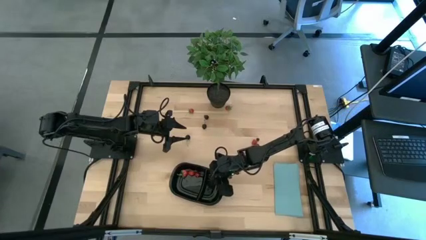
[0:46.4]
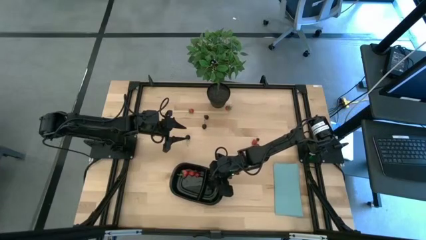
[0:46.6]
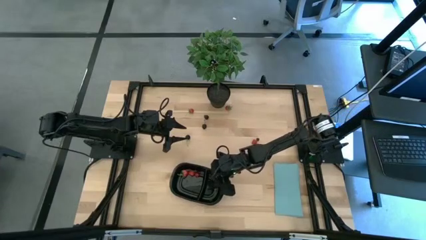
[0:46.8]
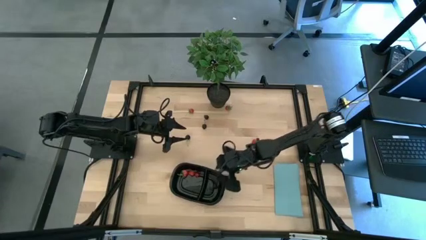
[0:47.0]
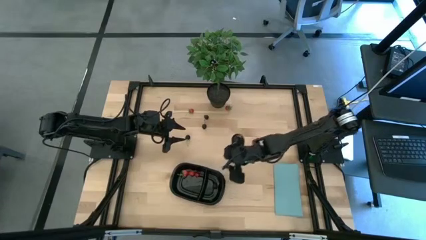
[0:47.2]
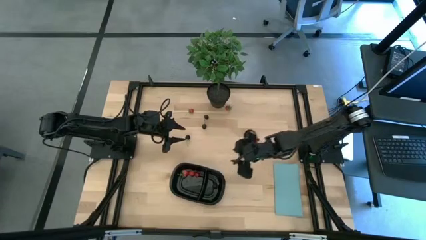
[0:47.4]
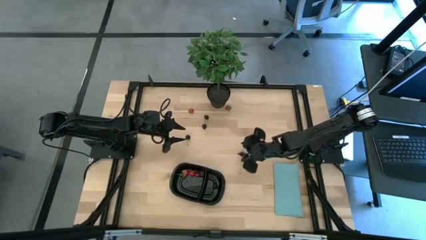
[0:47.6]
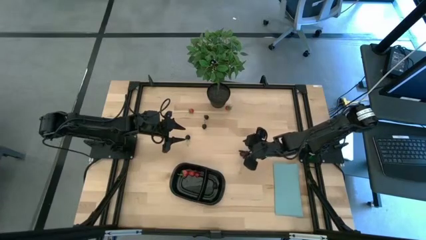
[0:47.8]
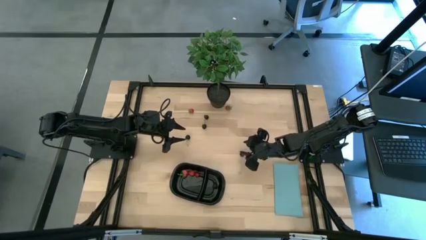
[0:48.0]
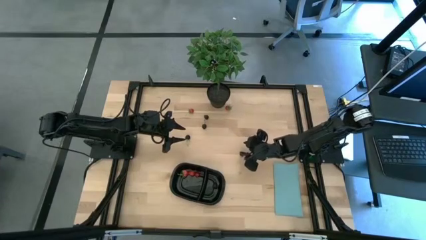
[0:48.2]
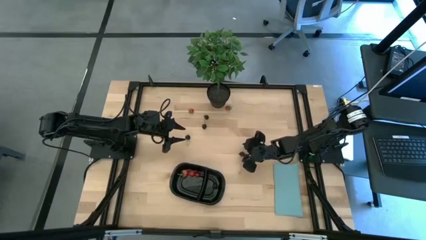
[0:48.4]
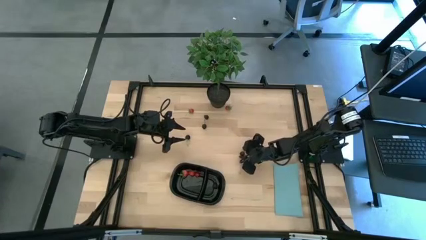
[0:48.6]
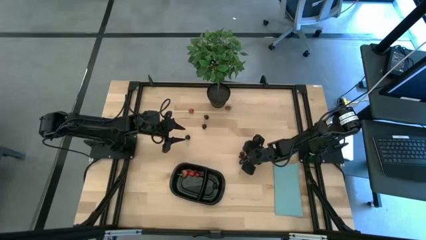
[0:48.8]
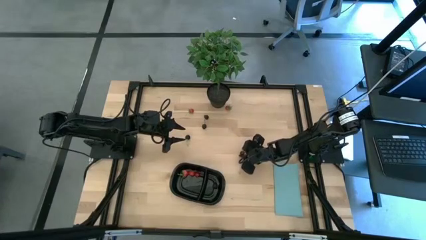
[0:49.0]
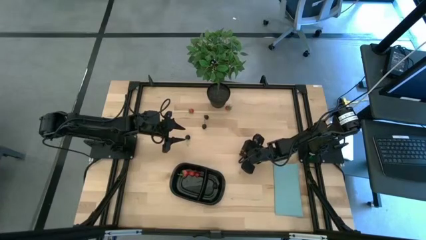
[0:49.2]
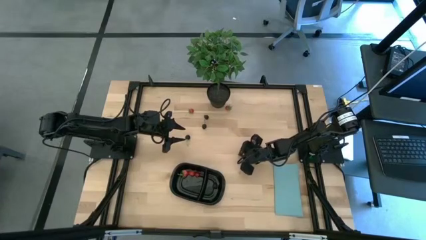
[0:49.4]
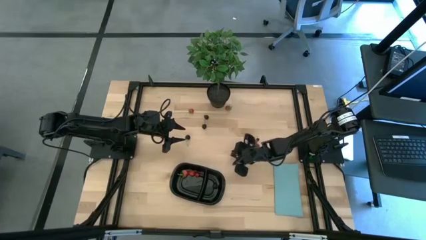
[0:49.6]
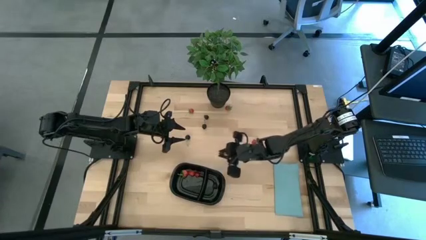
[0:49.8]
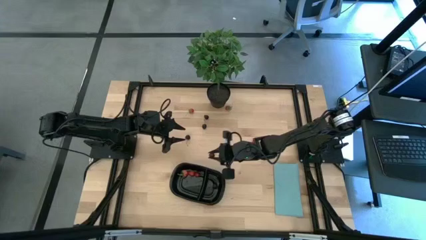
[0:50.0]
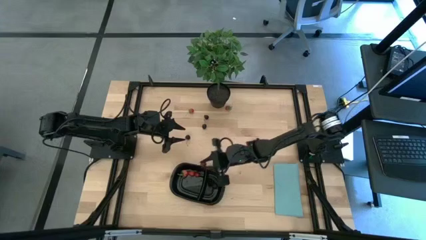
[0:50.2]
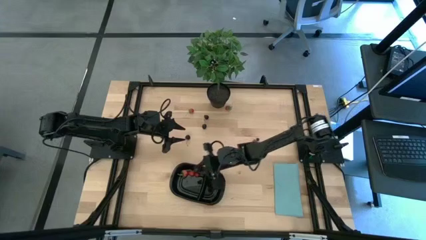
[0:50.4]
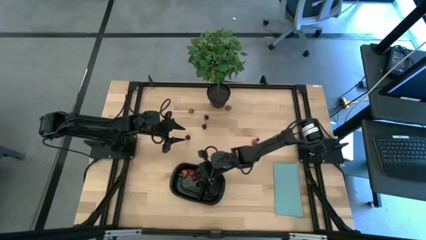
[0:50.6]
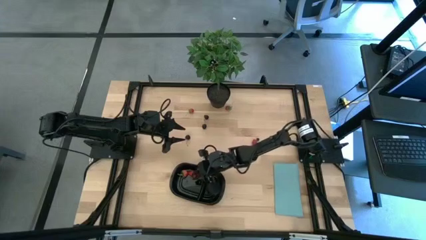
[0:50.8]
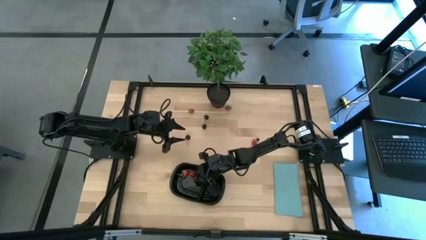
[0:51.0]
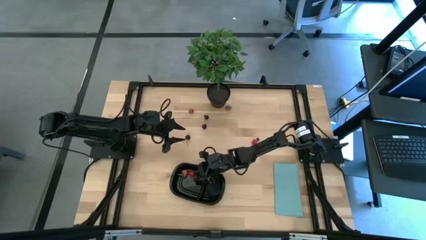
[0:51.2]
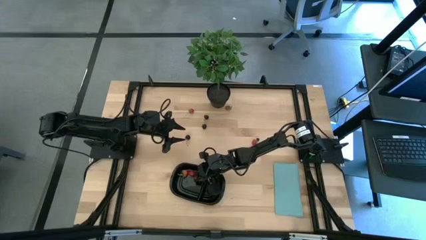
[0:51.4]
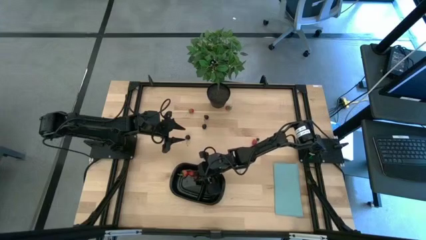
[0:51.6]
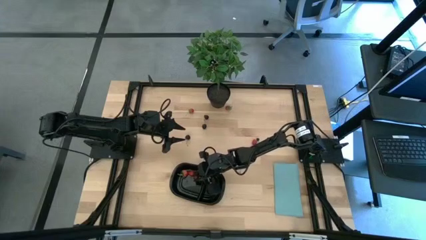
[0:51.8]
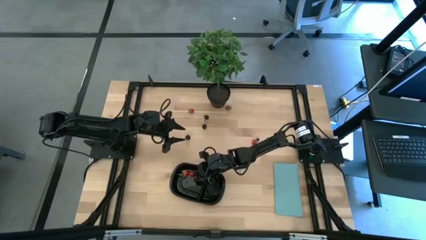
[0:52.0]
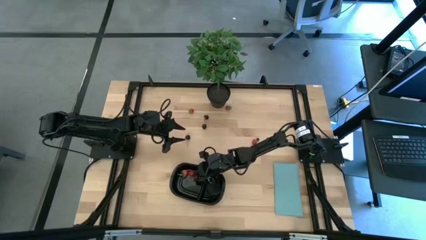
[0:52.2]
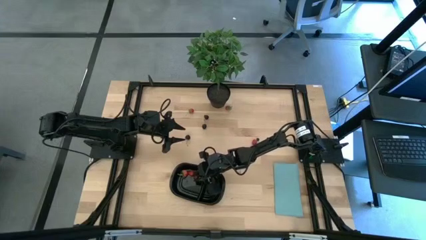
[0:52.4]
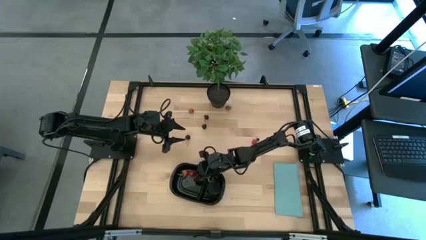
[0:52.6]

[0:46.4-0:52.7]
Task: Pick and placing Produce into tupperware
Put the bottom red cherry into the black container with the other red fruits

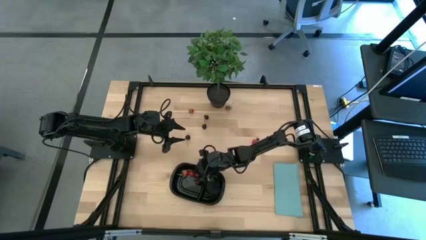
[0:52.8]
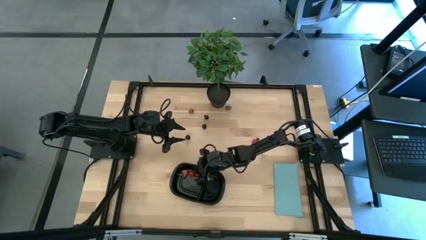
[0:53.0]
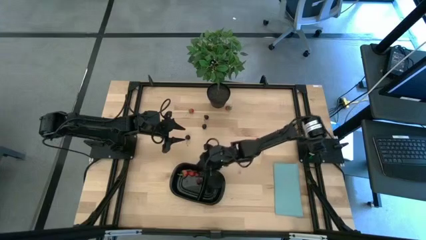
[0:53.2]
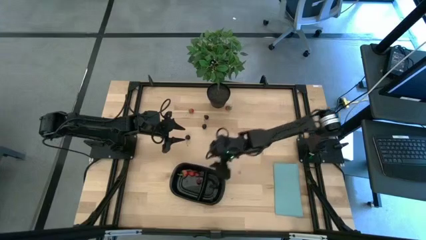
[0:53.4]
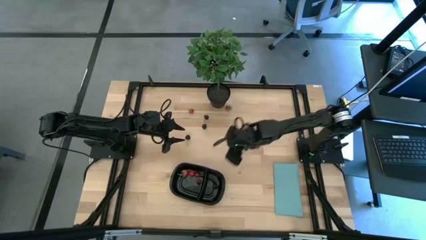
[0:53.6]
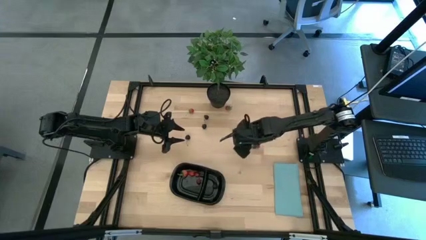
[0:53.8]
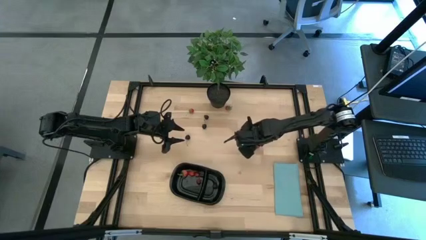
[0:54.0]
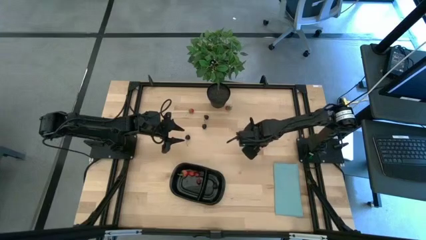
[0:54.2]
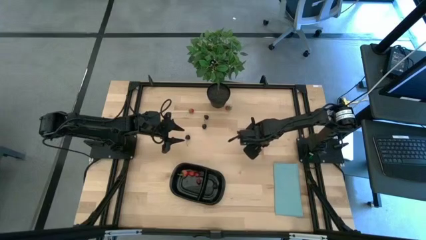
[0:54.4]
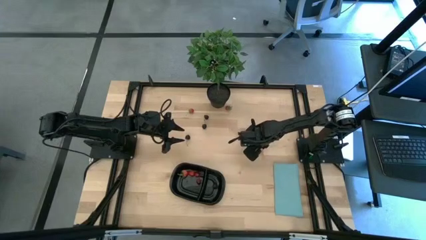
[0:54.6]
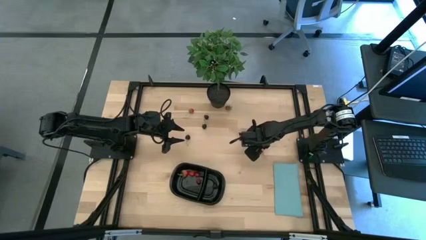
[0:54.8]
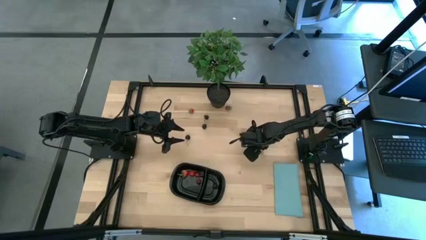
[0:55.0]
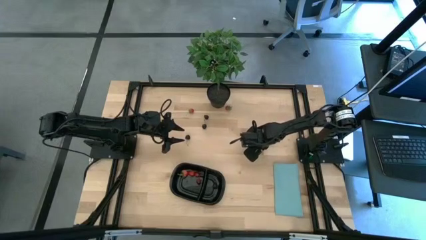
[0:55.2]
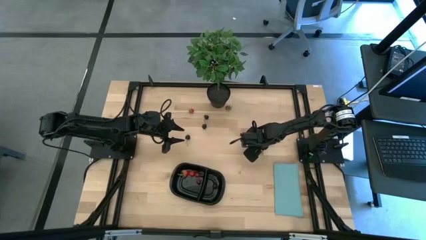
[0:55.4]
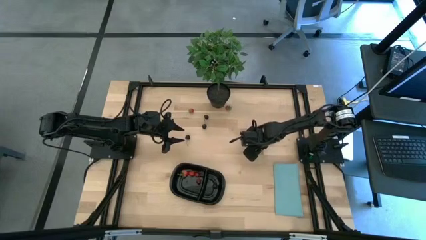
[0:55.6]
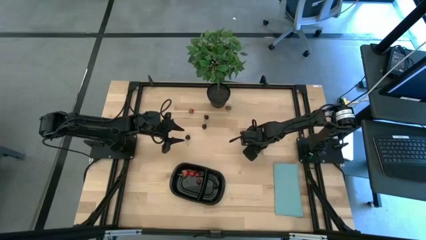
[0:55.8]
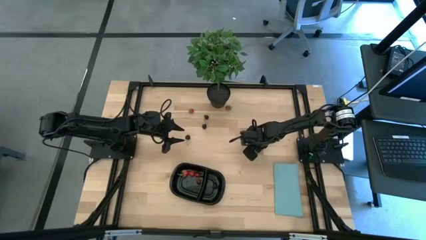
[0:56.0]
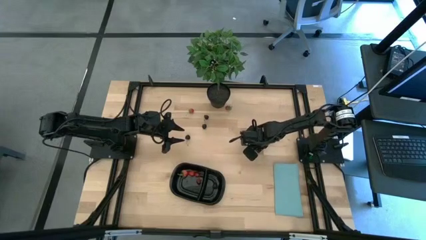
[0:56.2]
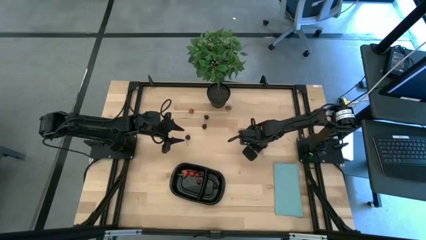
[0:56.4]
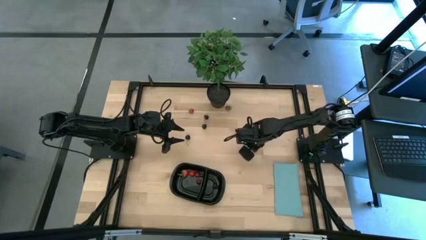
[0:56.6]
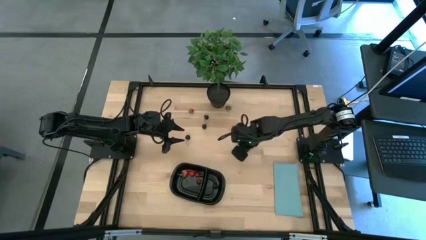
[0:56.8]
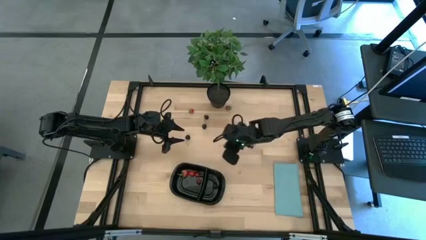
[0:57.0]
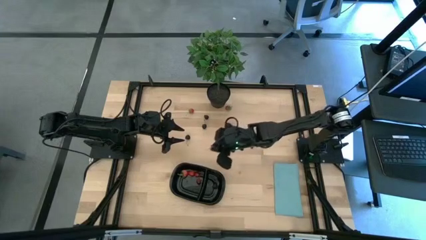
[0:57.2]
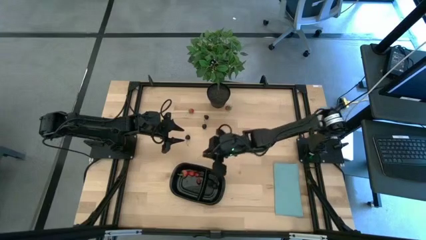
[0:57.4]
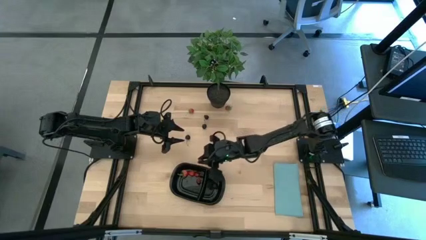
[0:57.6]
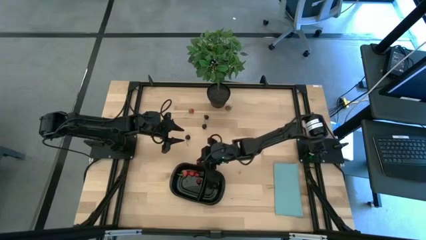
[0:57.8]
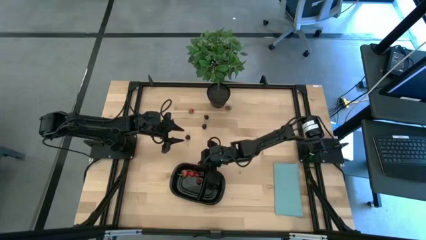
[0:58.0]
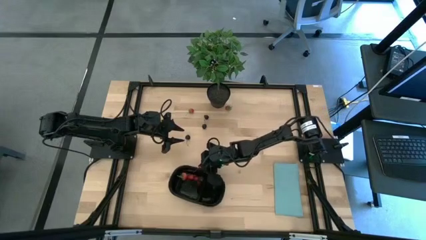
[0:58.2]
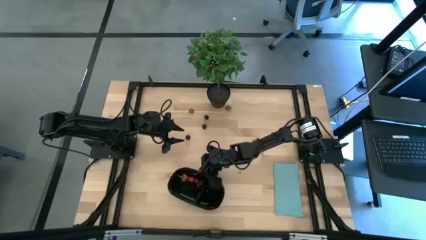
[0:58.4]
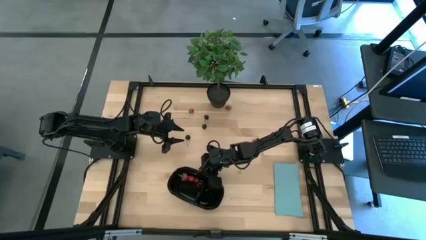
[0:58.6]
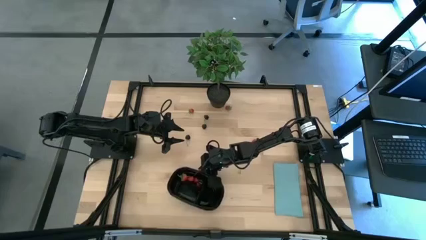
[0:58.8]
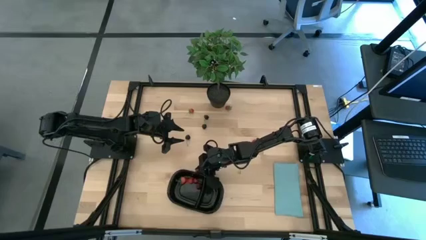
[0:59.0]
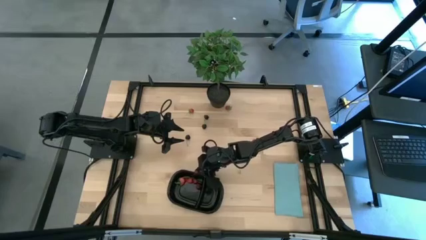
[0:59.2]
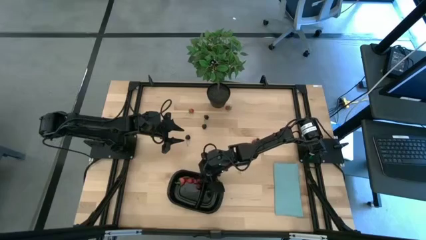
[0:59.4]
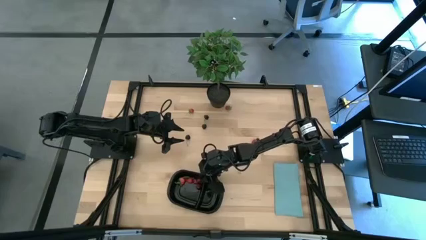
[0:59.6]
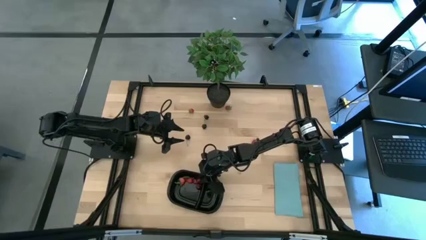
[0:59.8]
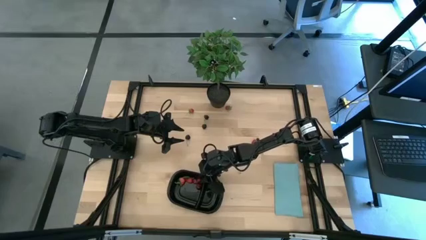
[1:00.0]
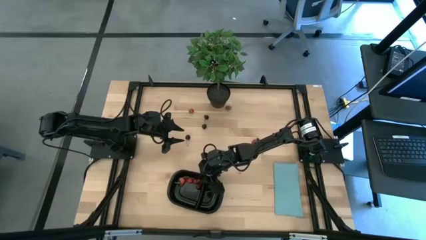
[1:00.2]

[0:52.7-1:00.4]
Put the red cherry into the black container with the other red fruits
